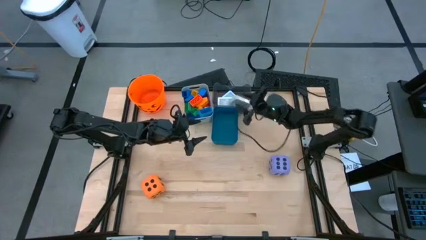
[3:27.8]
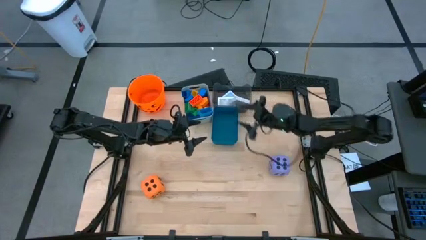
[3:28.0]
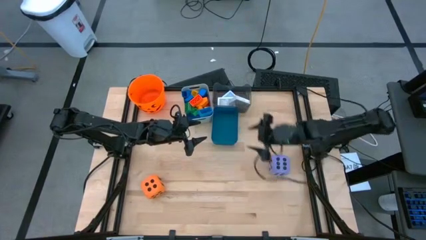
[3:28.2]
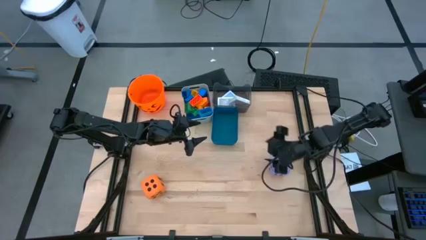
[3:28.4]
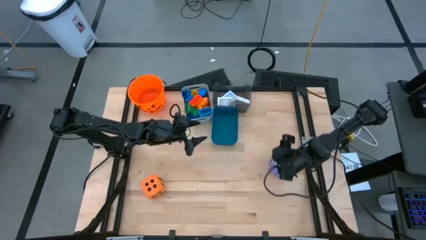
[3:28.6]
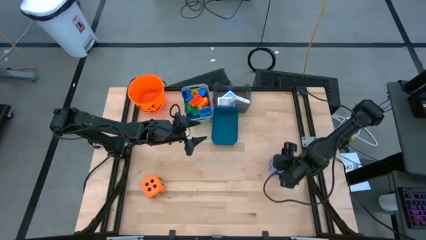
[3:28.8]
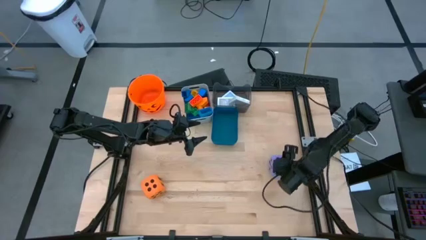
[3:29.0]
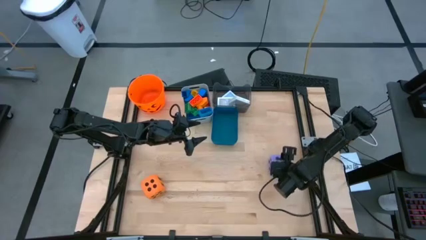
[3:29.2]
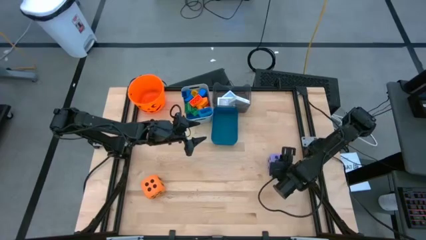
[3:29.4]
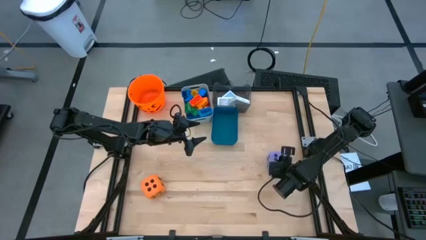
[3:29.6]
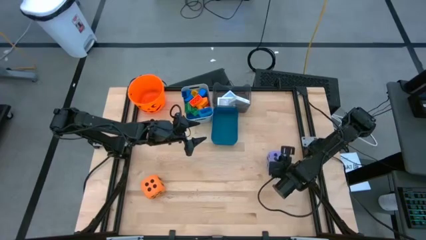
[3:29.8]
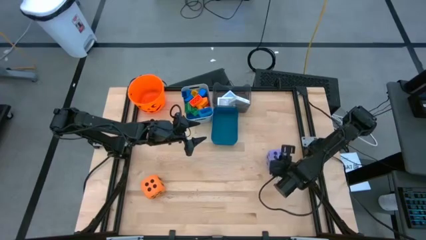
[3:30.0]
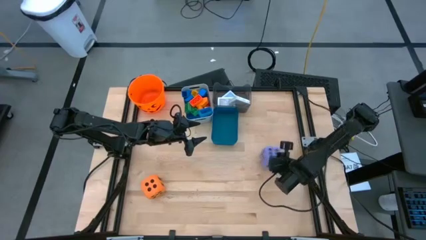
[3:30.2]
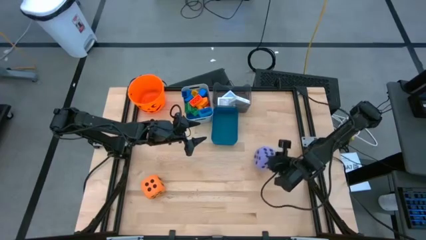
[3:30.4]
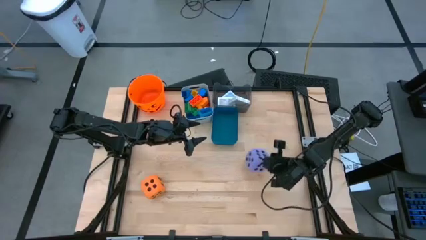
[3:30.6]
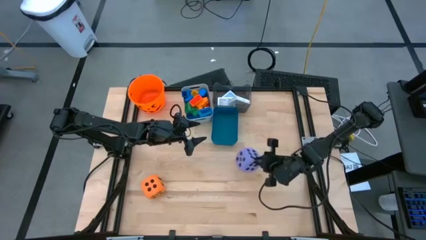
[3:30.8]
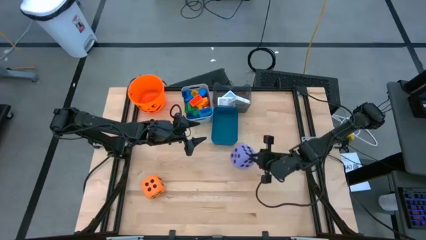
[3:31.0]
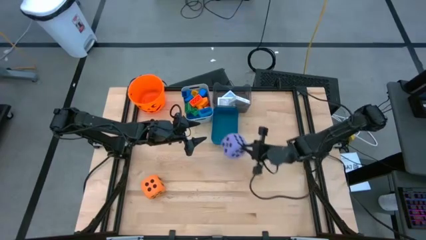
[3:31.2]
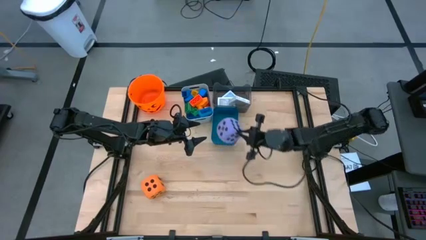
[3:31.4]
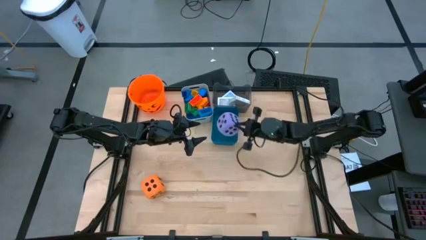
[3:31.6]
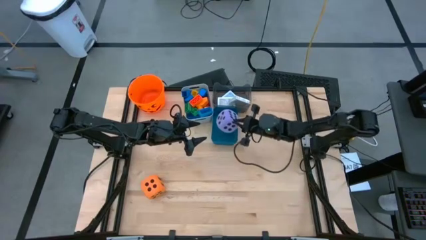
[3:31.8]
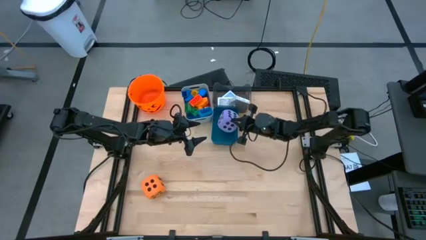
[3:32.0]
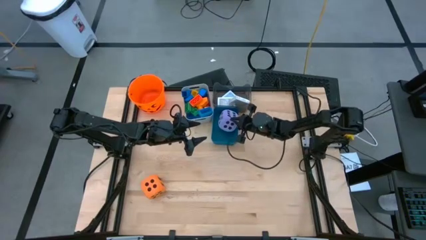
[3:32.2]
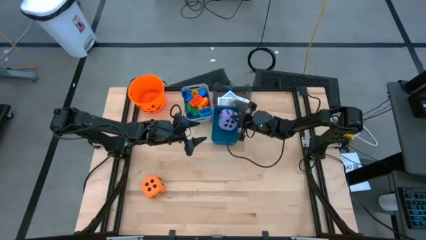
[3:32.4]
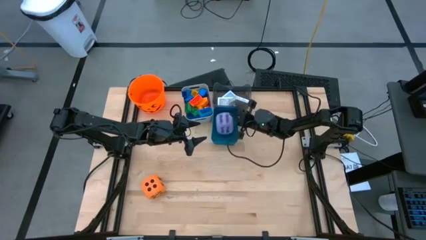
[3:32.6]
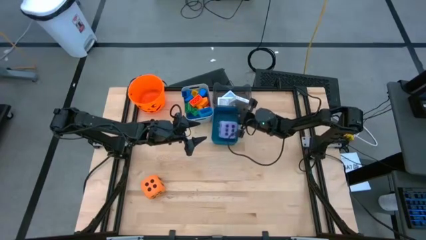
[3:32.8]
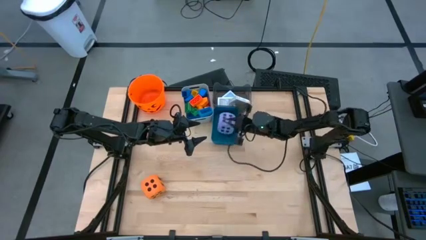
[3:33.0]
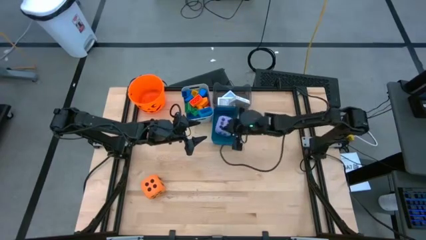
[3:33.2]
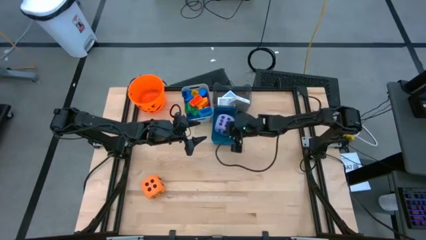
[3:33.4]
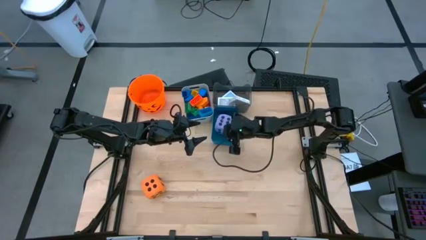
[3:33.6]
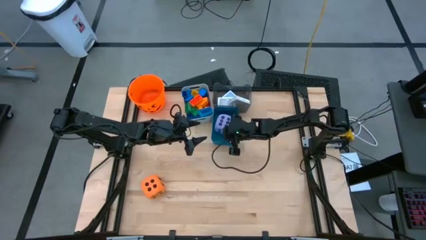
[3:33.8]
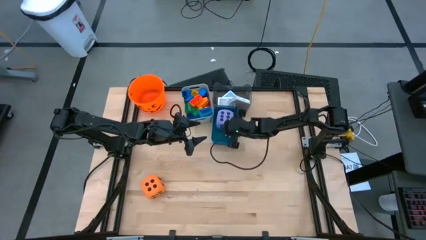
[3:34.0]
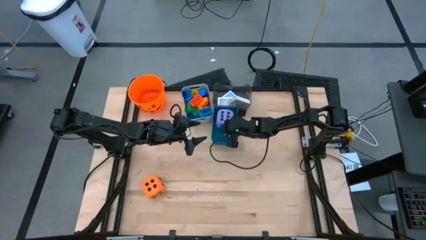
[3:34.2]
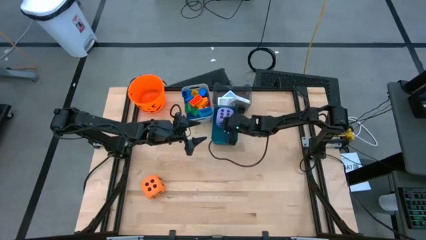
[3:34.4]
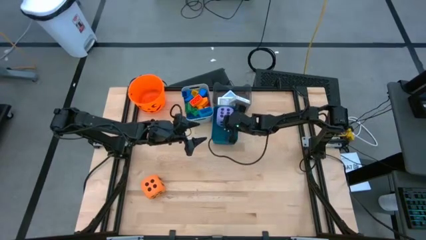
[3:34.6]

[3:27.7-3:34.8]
Task: Pick & Place Toys
Put the purple dice into the blue bin

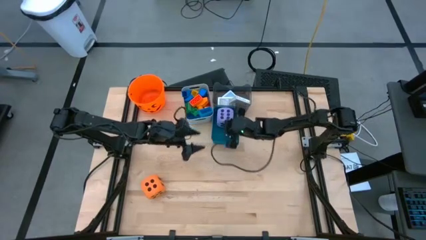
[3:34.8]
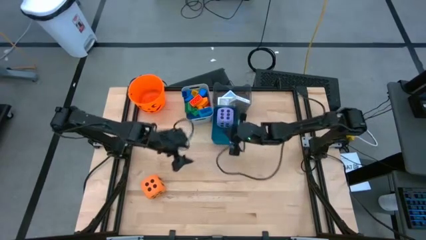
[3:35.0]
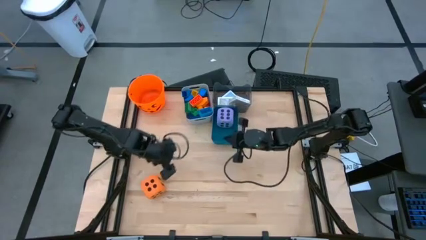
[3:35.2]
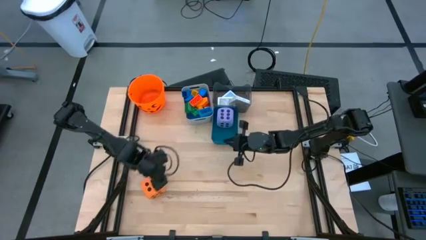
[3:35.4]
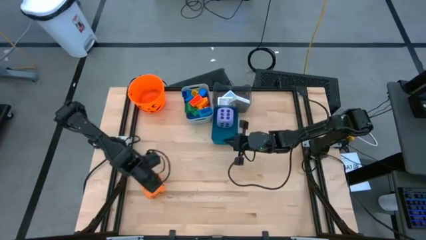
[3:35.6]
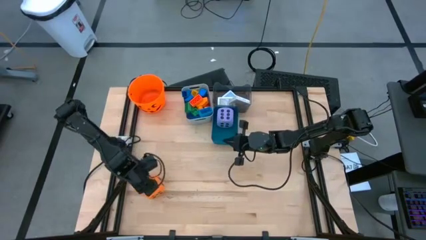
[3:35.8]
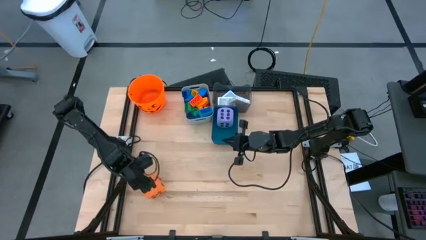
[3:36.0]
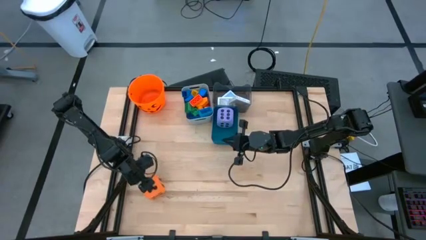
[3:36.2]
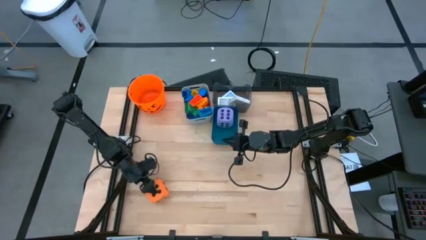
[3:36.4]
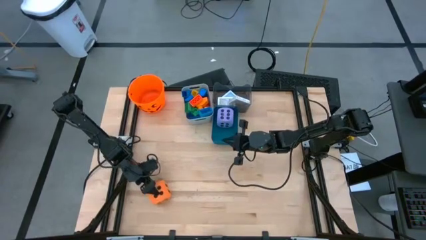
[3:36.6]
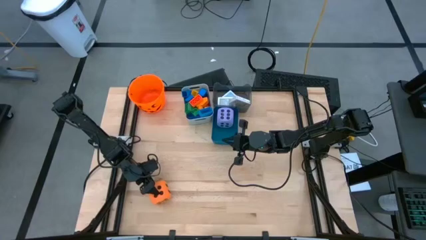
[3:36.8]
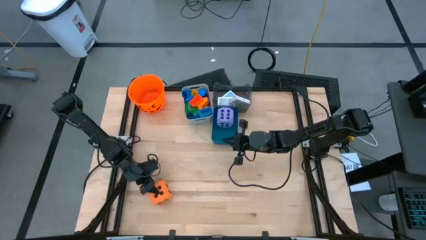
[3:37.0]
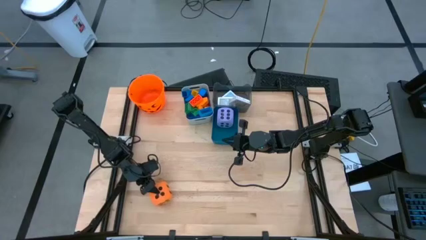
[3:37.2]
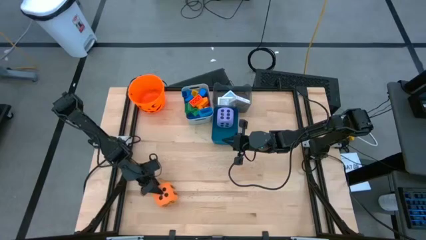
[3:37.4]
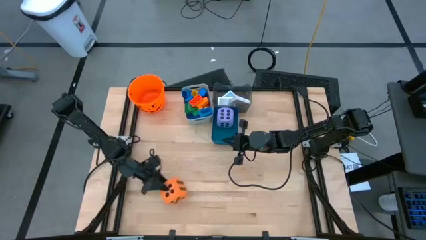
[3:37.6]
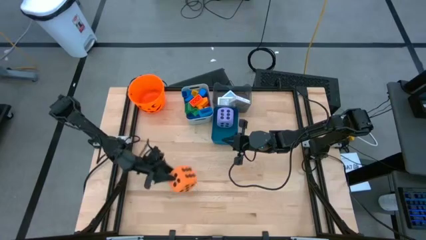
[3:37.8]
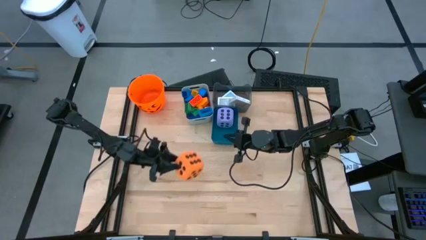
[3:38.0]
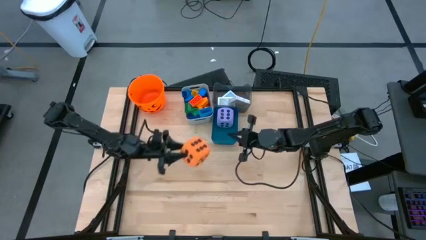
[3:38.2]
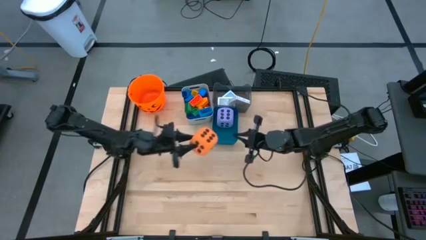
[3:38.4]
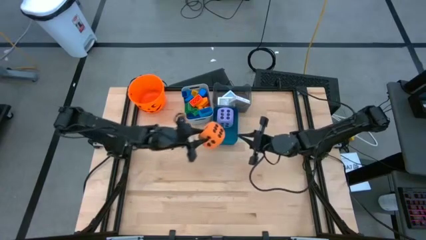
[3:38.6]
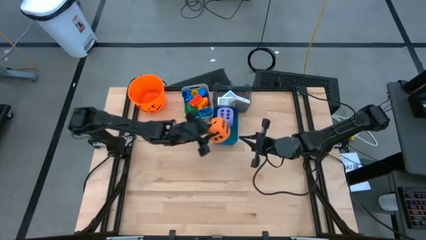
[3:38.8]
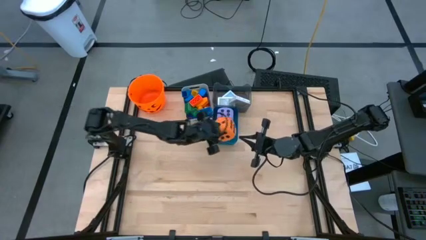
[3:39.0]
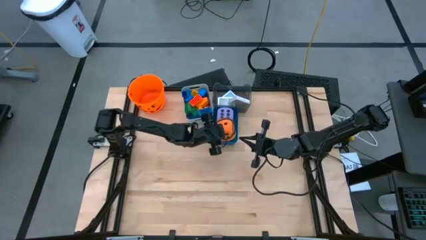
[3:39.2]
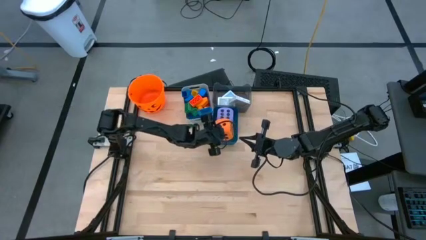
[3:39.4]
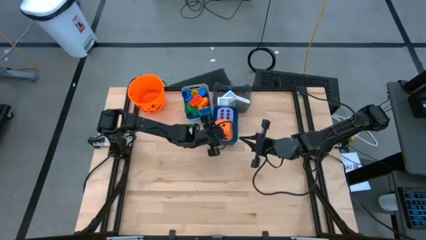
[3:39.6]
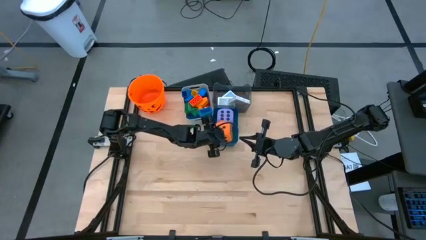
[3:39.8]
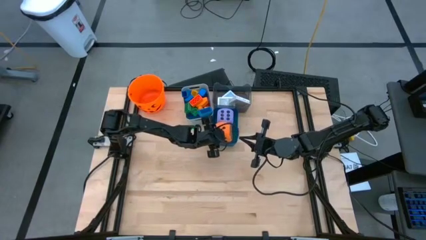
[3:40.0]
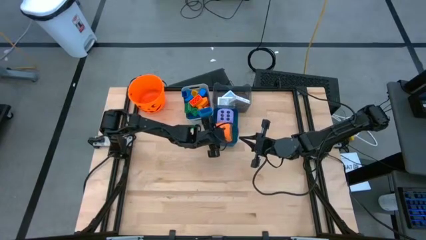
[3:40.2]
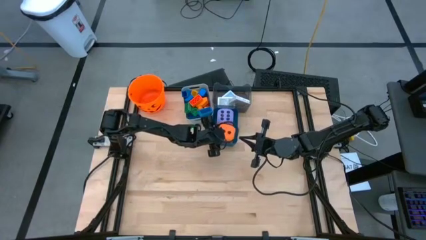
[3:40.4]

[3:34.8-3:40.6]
Put the orange dice into the blue bin

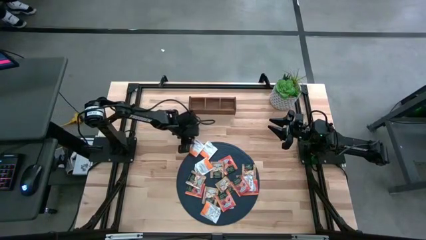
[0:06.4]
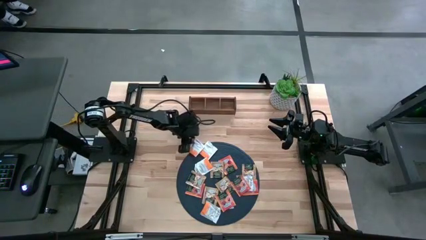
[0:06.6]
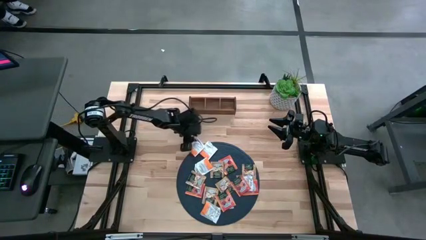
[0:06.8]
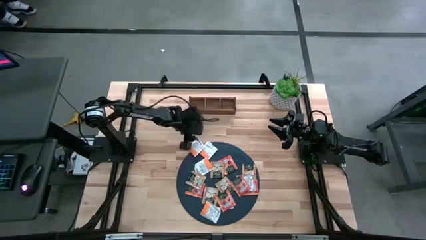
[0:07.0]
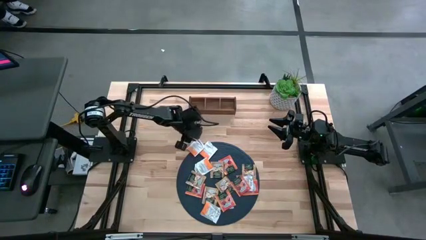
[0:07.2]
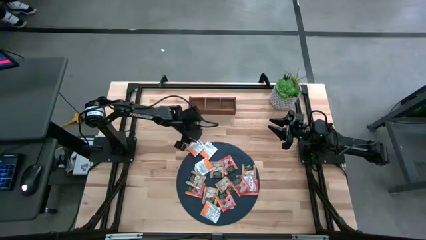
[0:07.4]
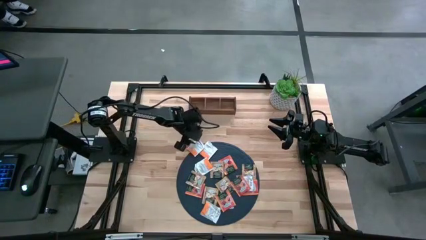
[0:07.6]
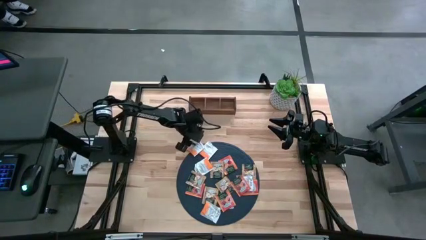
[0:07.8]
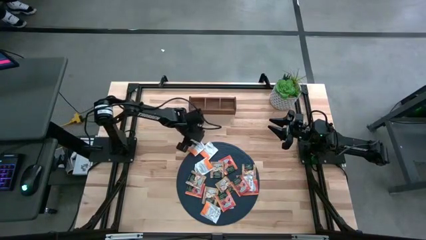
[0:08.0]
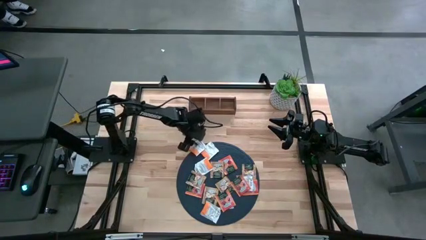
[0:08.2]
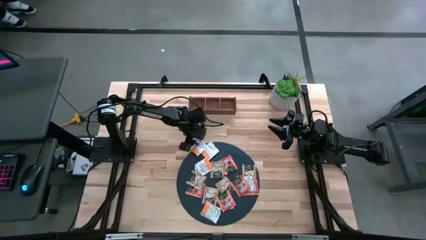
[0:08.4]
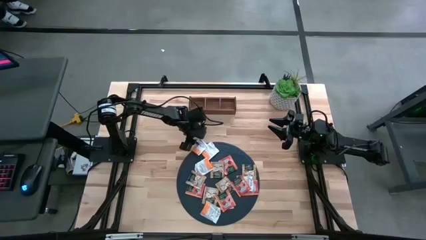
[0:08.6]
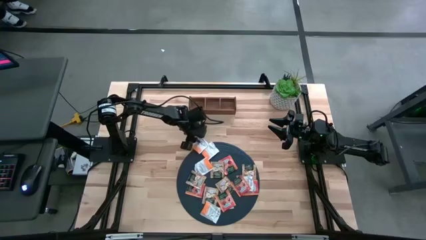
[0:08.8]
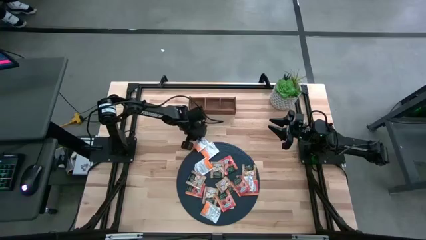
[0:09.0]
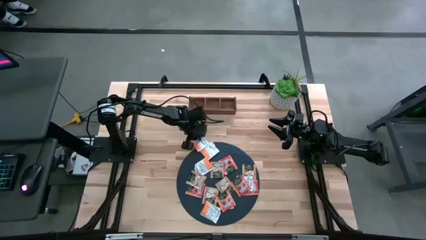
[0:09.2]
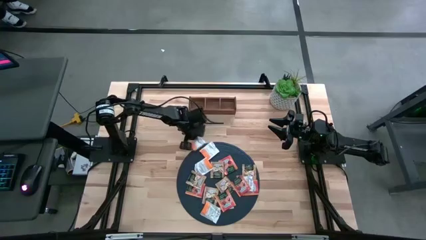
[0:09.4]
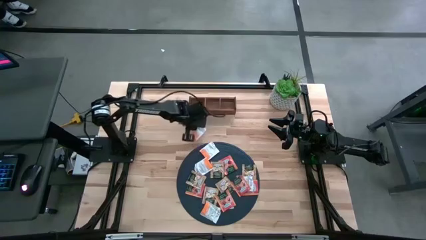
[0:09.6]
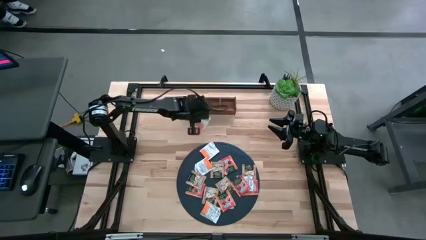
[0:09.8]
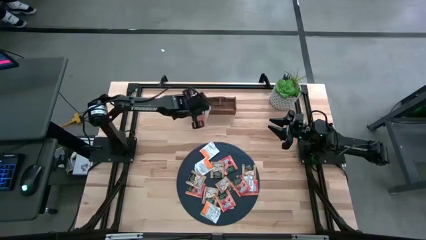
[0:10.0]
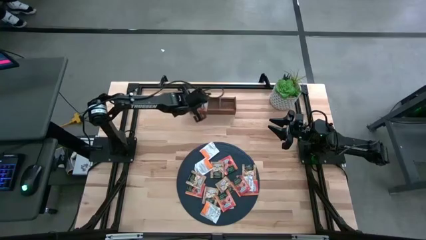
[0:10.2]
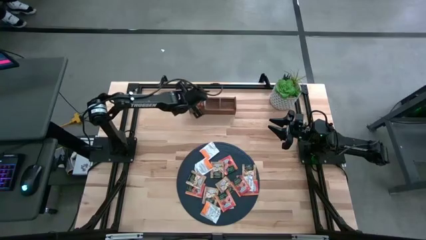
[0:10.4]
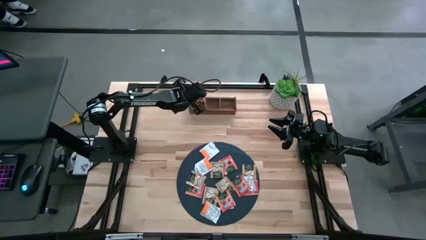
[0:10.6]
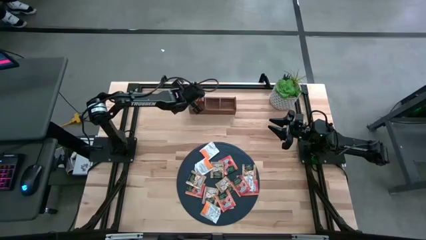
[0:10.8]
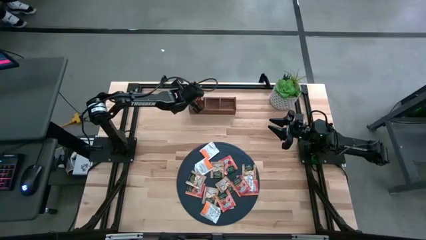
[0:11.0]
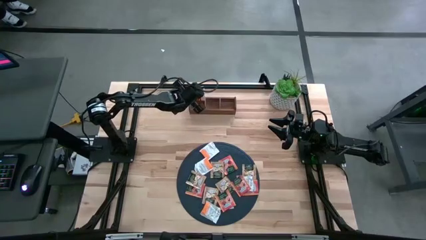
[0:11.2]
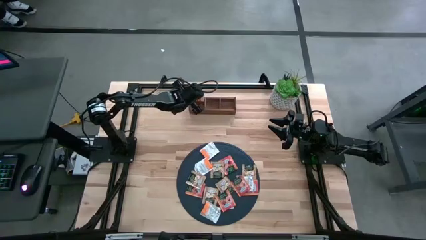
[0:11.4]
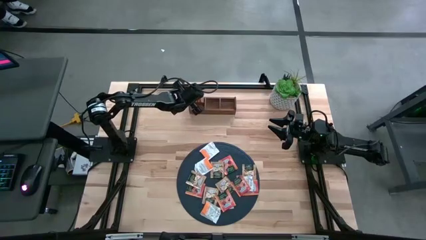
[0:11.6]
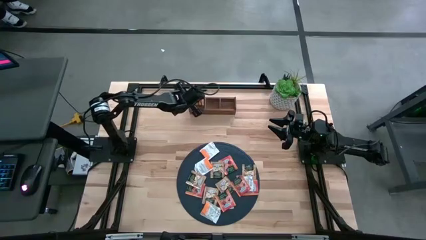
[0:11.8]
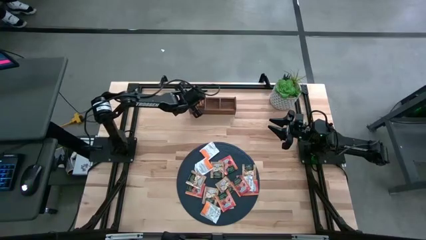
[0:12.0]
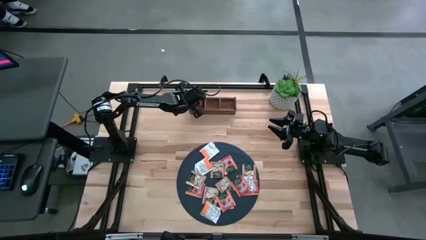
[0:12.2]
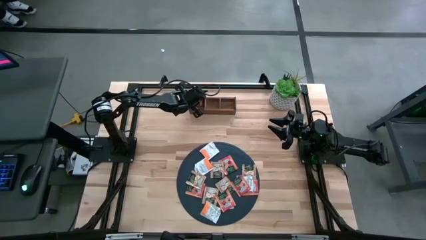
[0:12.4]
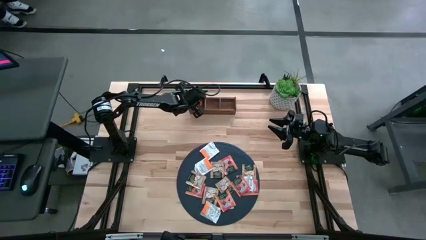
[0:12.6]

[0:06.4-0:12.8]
Task: Pick & Place Tea
Put the white tea bag into the left section of the wooden organizer
